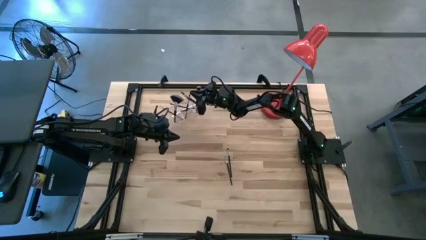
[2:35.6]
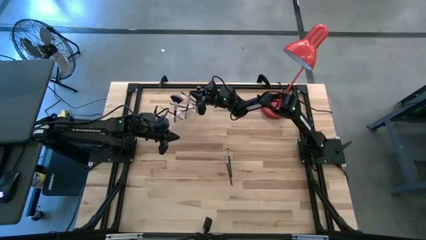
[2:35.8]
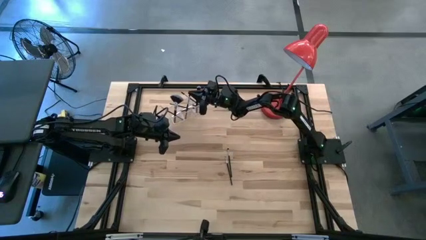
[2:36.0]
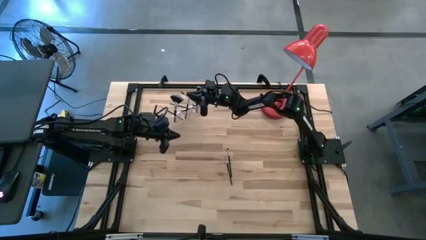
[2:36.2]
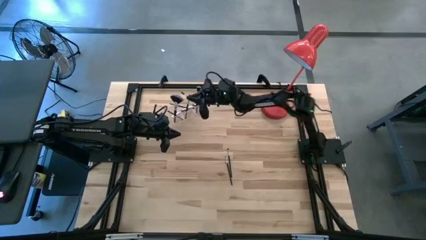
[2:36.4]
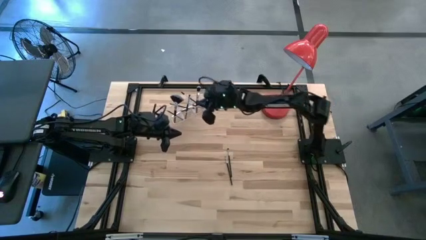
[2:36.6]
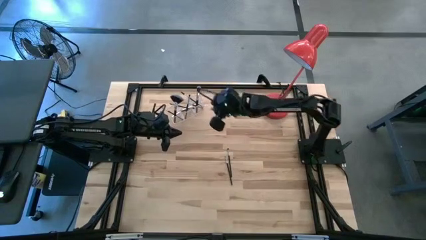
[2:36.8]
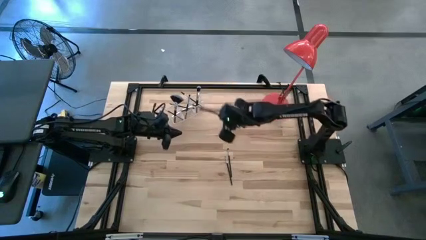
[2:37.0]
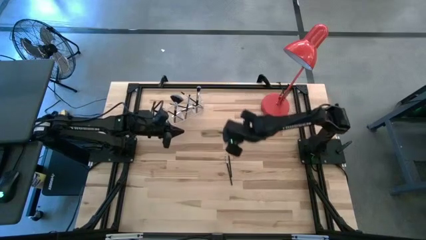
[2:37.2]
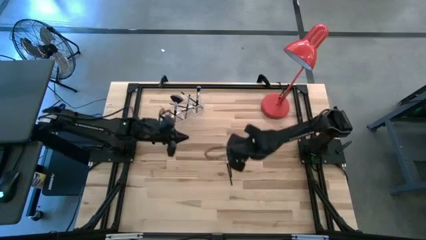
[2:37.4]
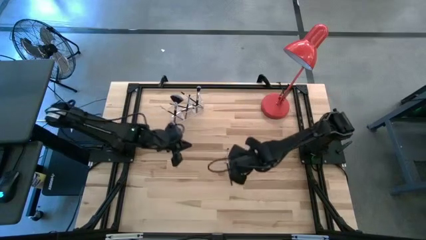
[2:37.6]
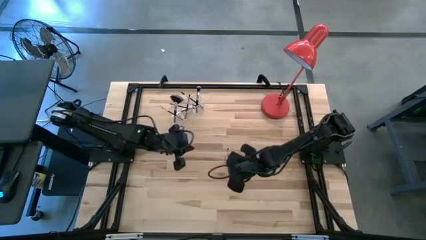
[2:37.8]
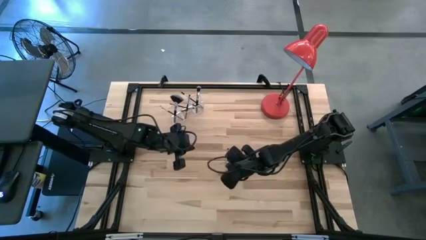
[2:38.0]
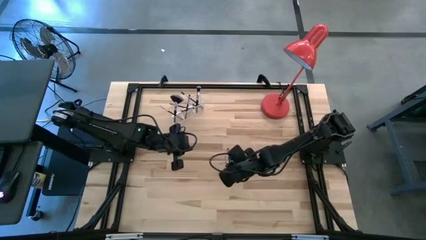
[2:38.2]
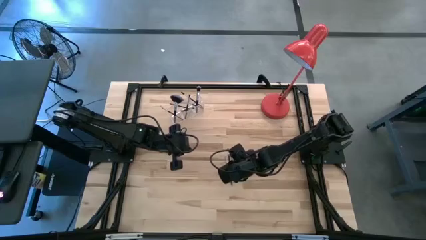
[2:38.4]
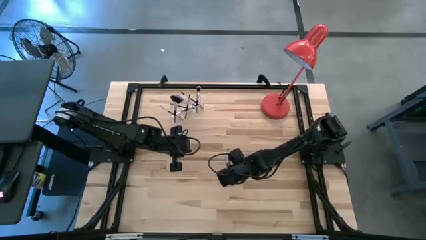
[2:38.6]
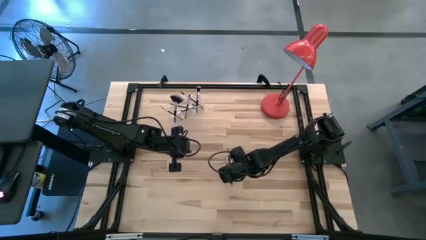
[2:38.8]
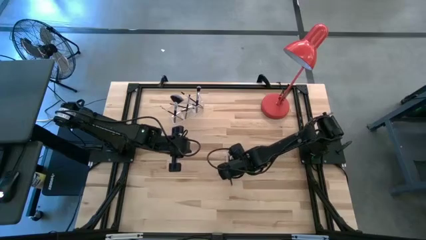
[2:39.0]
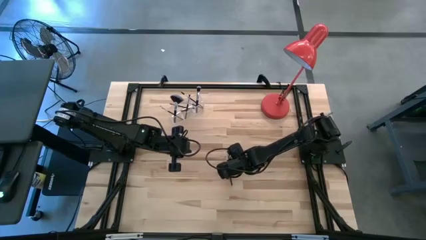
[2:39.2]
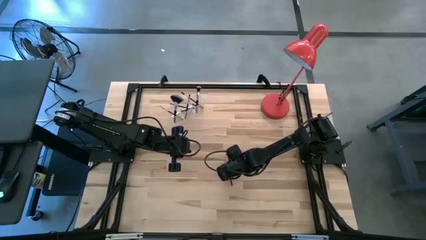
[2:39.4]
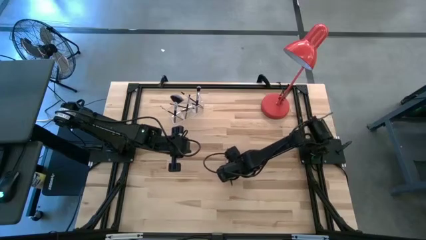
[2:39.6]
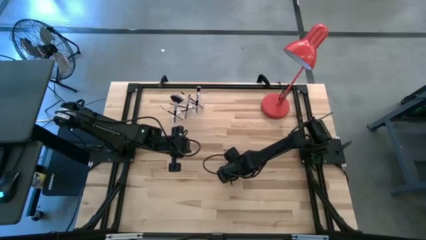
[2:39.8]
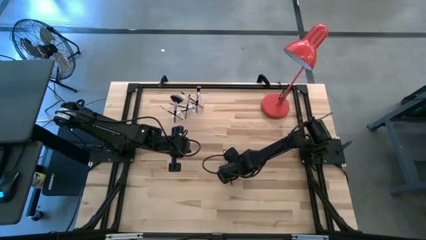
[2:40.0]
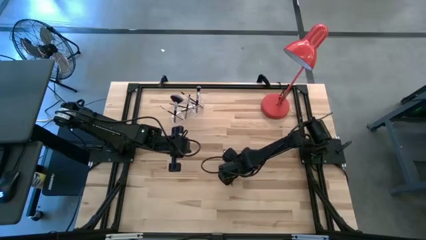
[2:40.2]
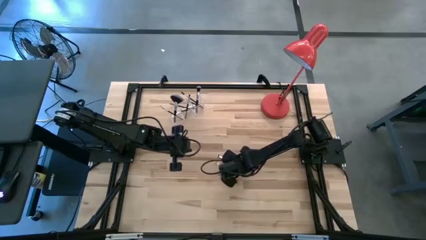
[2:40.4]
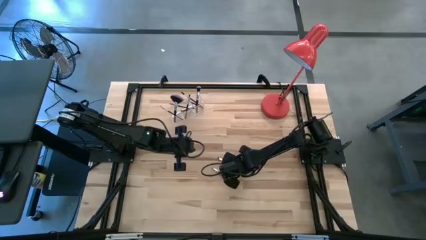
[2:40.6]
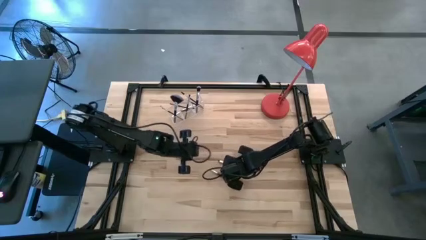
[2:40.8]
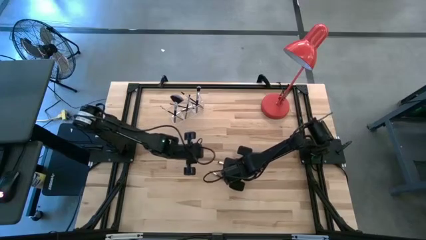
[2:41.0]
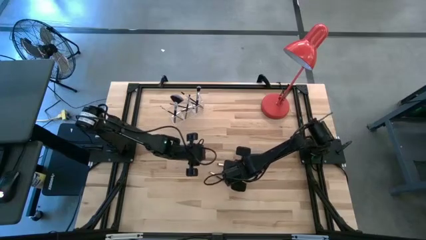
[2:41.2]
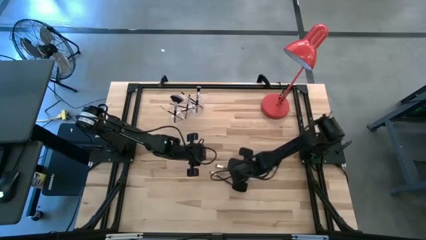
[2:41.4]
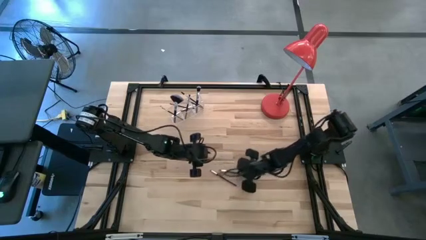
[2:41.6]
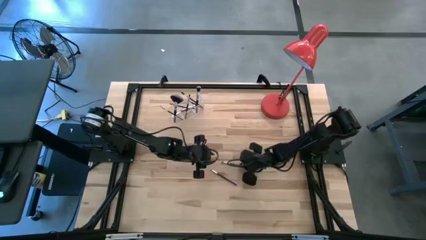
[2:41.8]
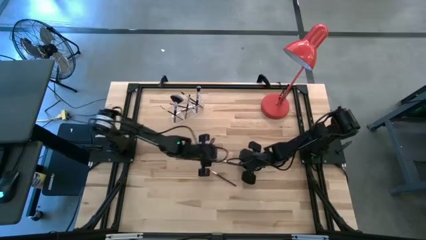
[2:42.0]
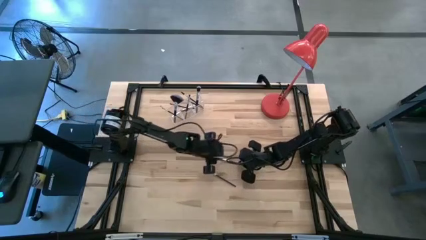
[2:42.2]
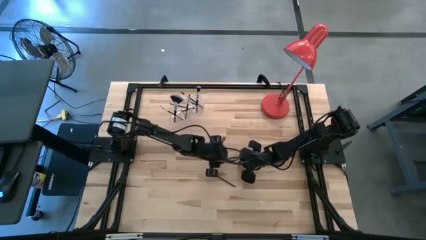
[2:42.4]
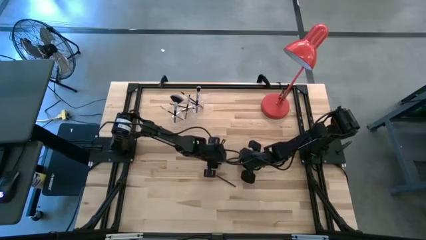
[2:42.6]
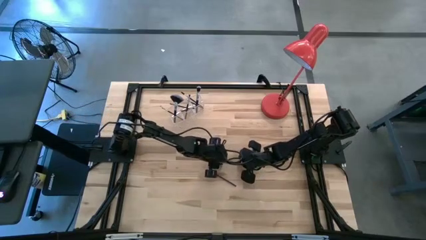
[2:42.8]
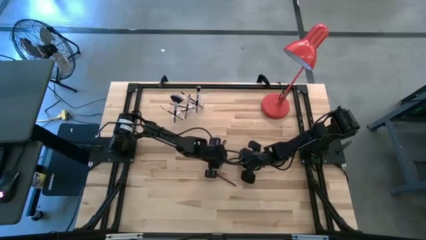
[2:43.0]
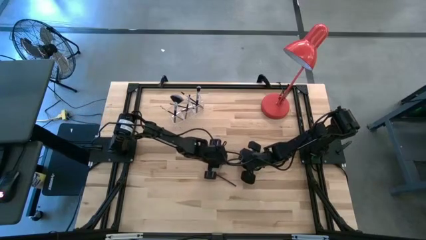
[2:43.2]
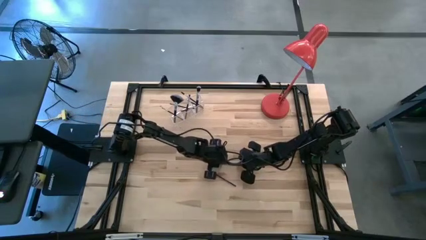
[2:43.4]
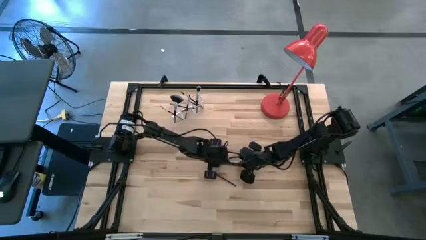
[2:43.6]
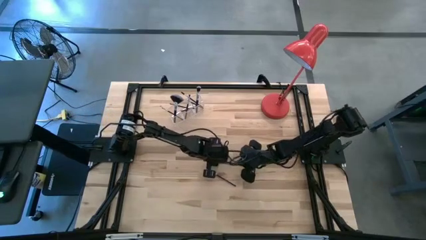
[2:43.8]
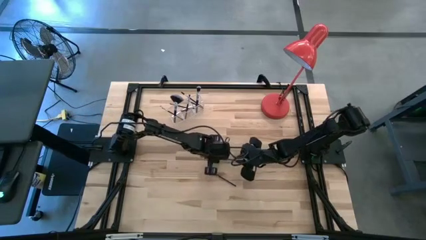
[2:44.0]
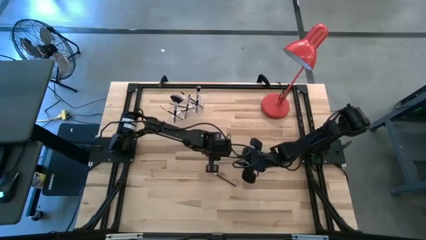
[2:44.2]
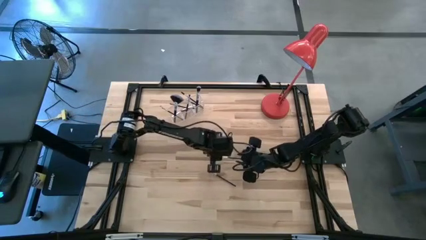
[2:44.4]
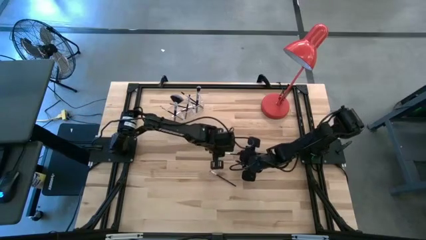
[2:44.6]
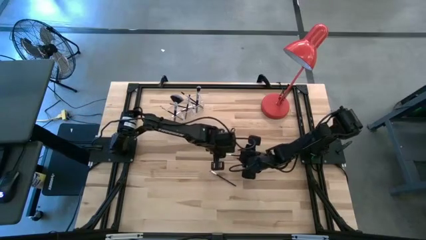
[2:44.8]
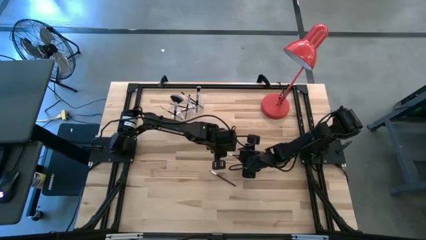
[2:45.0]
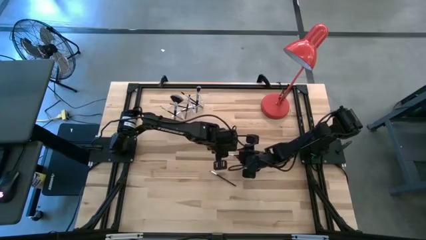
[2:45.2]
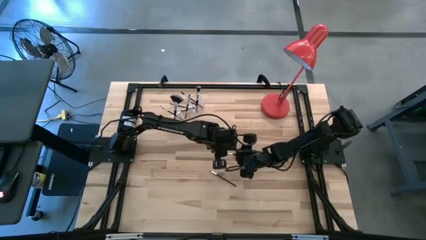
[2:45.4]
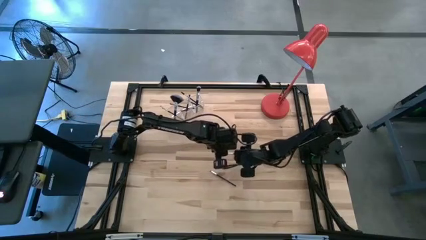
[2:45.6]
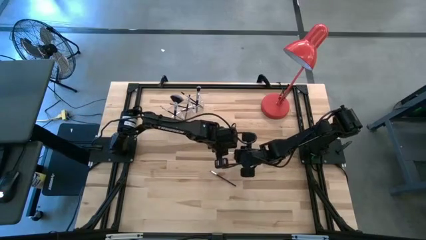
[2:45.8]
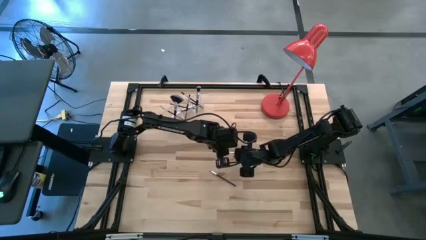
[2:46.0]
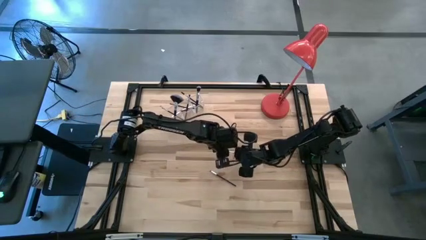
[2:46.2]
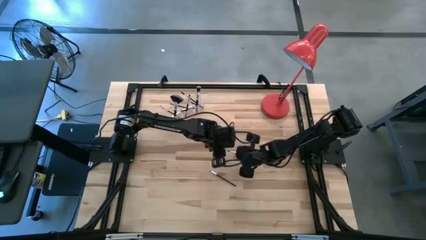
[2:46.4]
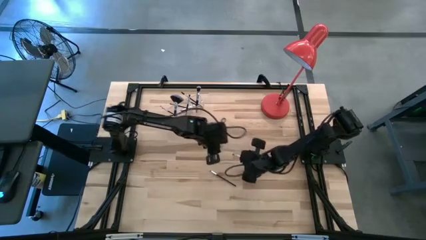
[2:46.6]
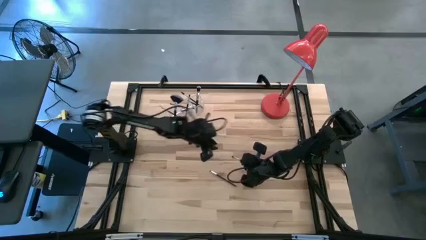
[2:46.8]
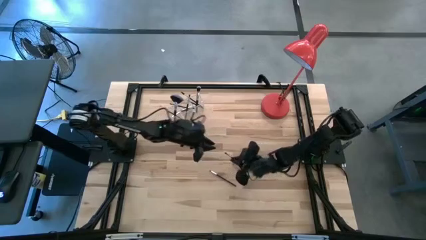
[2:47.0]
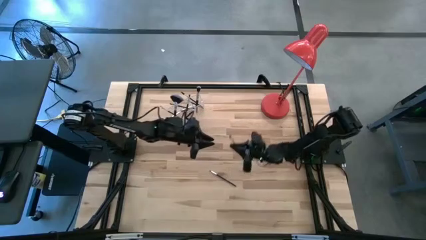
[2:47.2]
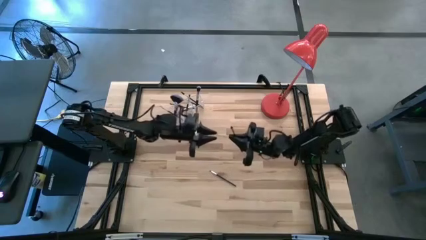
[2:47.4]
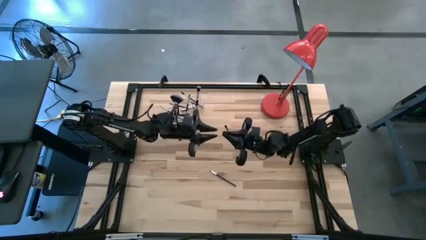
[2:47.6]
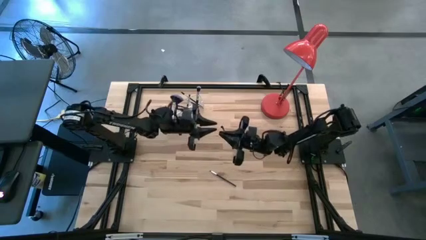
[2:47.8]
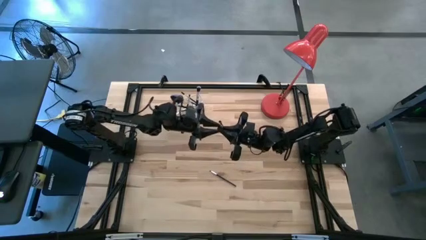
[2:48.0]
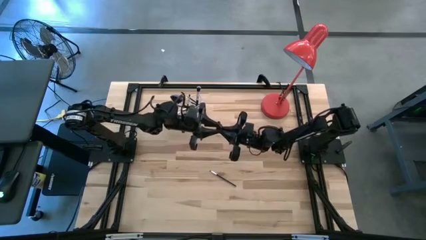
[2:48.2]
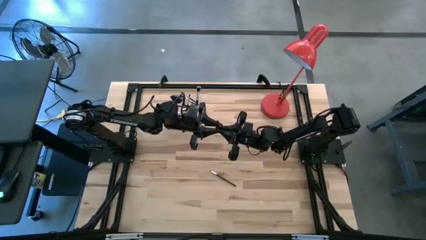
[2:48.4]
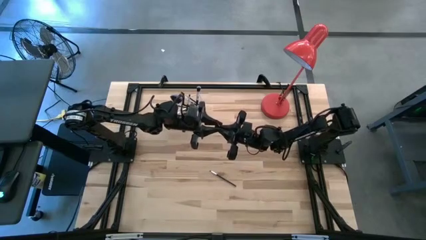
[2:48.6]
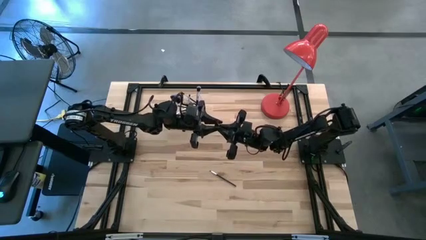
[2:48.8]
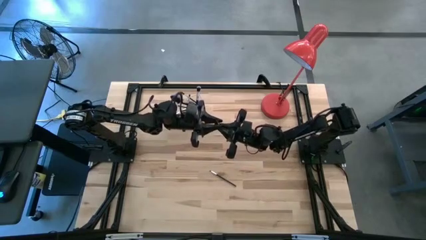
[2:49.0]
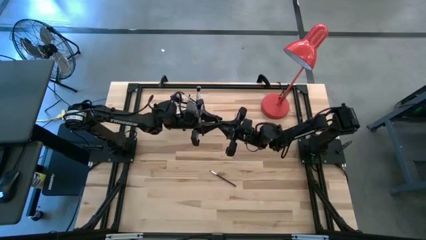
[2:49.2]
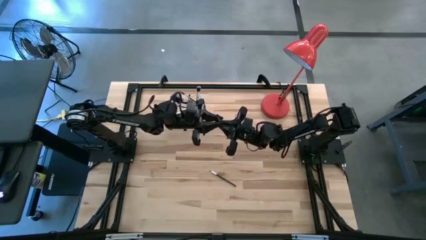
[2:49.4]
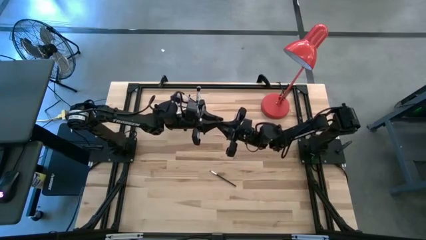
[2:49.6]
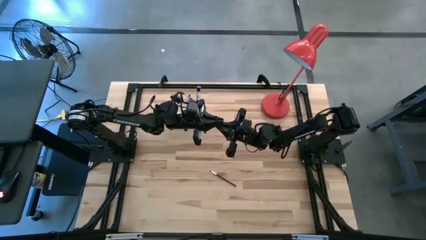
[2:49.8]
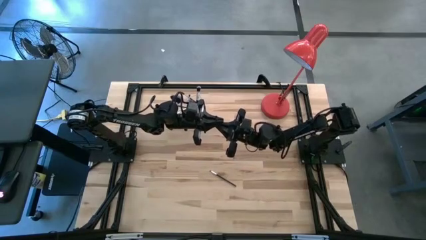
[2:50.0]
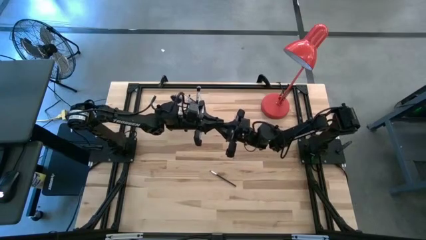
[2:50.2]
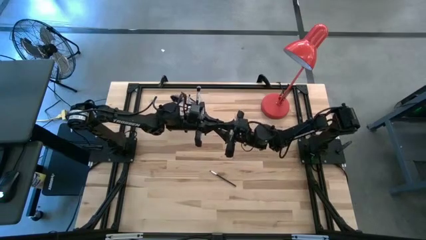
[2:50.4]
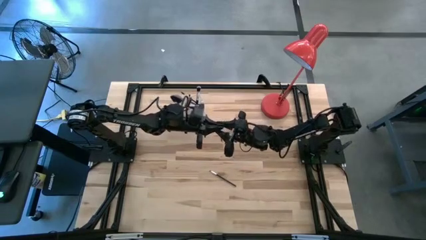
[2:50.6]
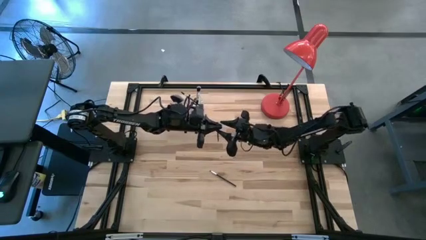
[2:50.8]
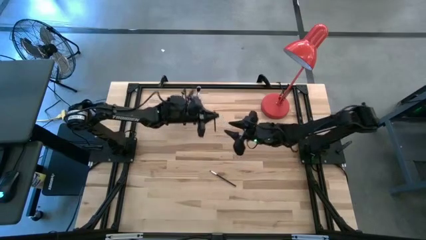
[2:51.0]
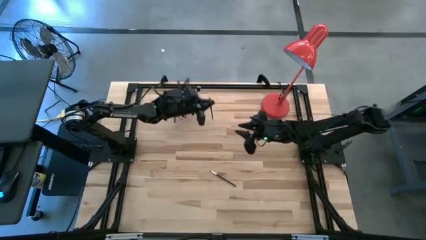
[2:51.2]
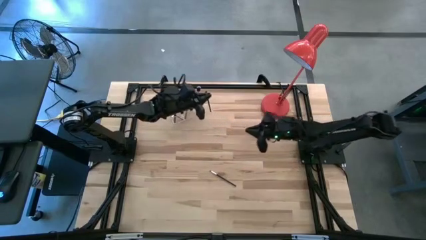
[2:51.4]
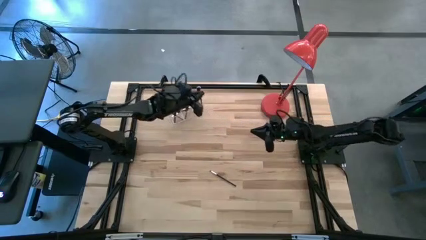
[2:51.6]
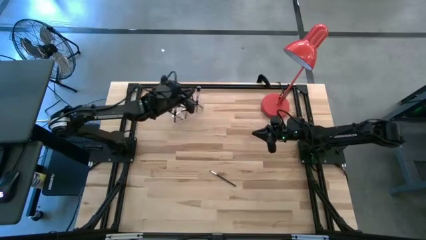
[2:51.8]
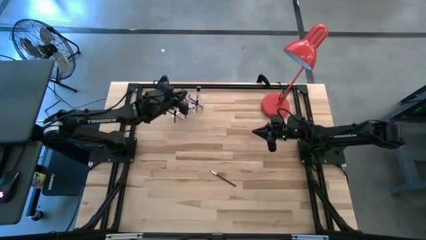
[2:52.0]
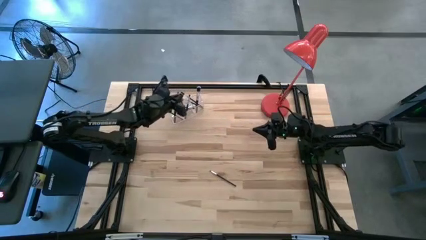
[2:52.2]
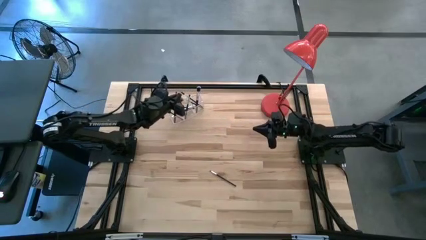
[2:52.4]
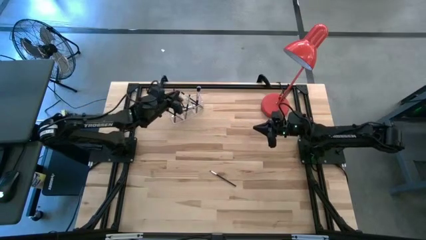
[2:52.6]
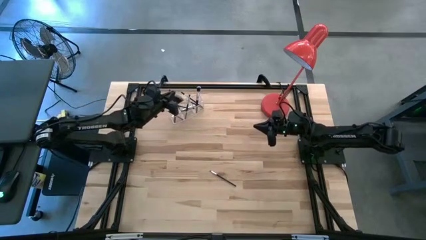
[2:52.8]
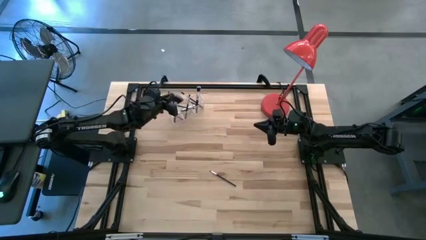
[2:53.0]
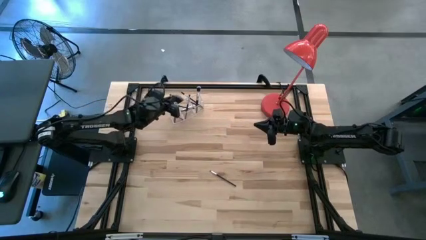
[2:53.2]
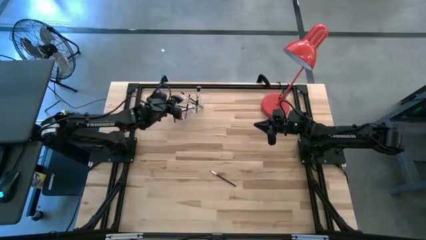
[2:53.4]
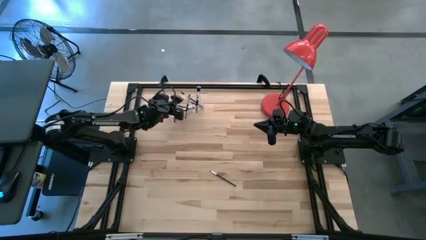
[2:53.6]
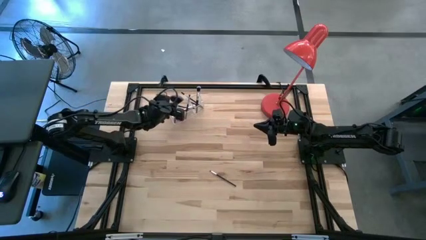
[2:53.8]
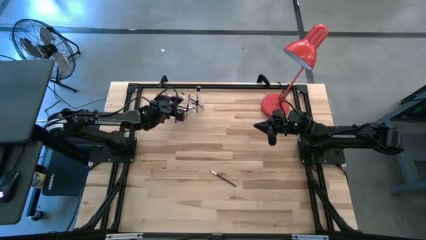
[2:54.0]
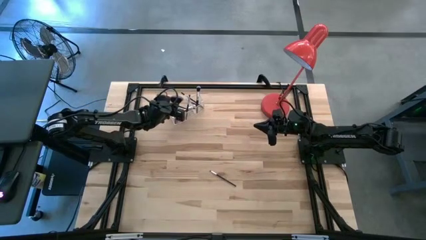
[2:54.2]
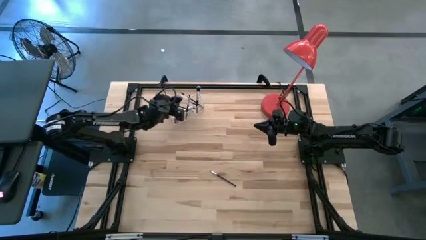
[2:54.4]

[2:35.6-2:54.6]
Task: Put items in baskets/containers
Put the eyeshadow brush sponge into the transparent organizer
